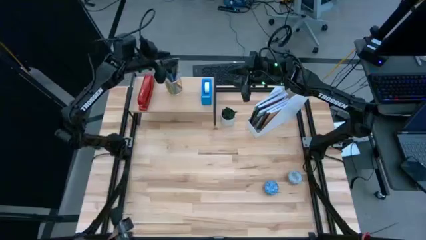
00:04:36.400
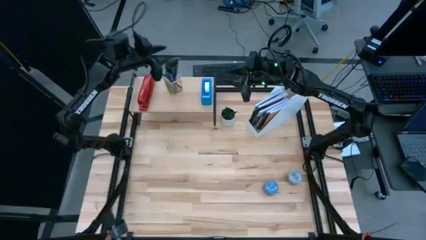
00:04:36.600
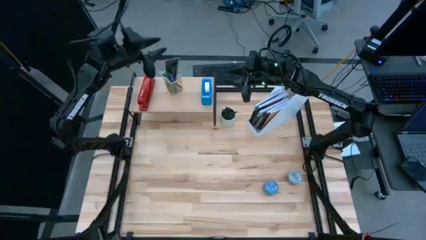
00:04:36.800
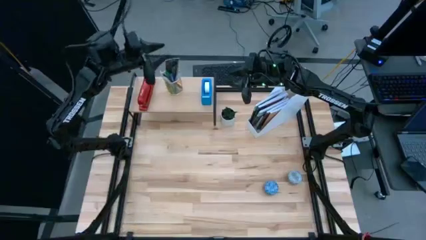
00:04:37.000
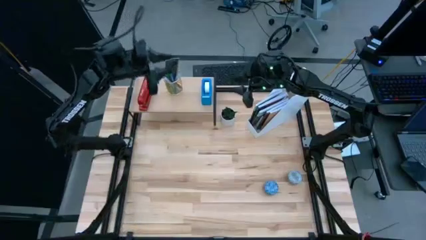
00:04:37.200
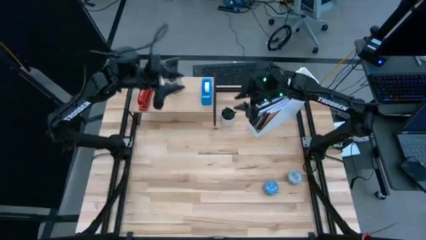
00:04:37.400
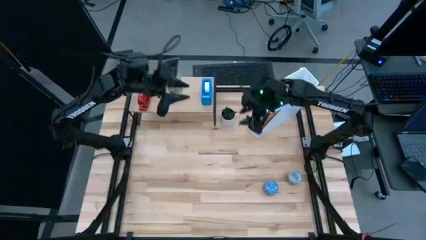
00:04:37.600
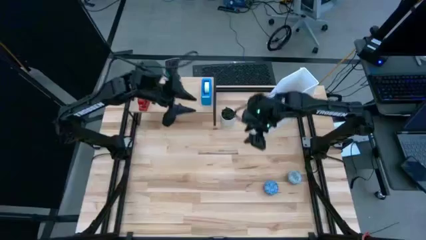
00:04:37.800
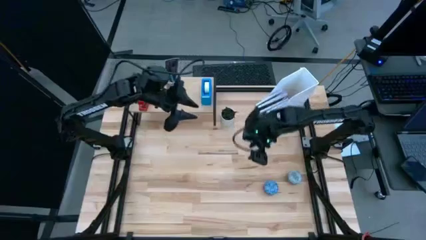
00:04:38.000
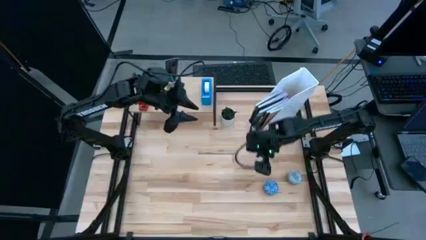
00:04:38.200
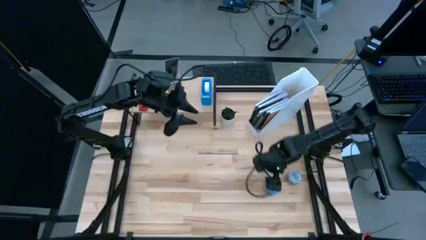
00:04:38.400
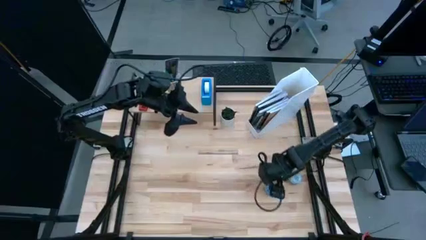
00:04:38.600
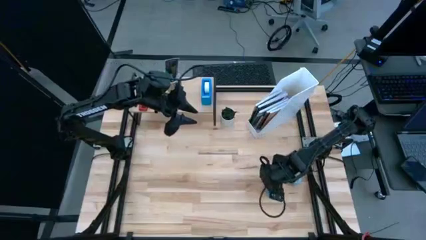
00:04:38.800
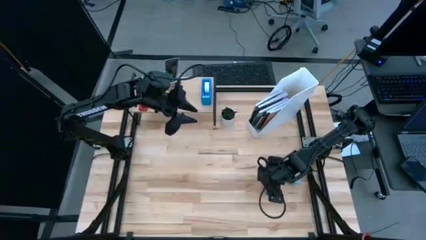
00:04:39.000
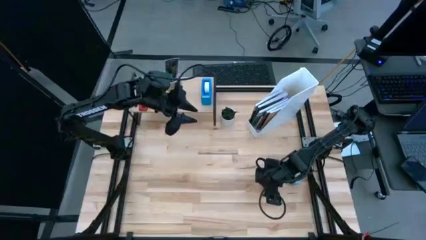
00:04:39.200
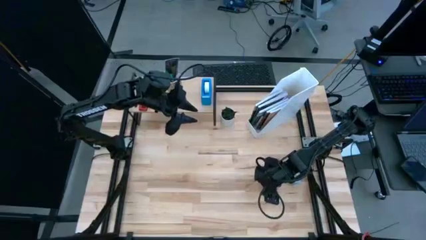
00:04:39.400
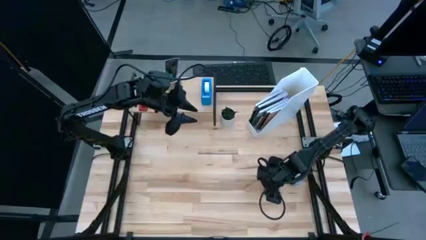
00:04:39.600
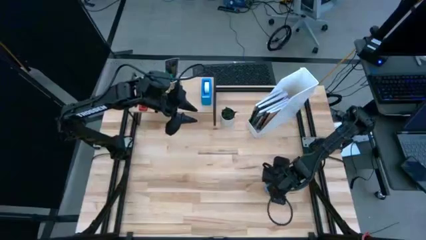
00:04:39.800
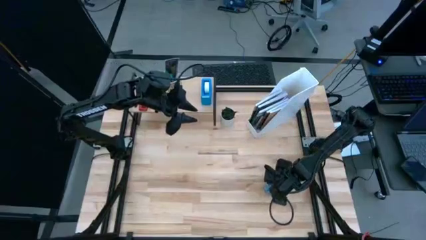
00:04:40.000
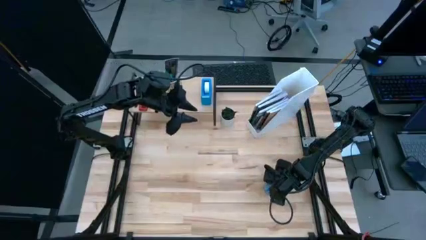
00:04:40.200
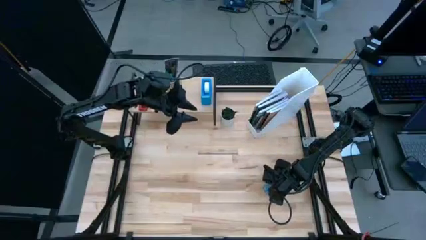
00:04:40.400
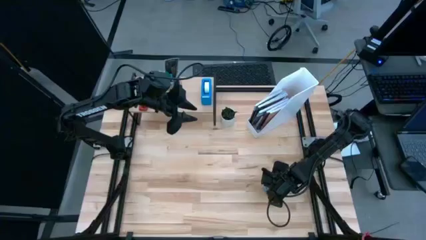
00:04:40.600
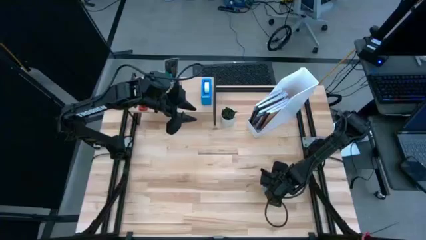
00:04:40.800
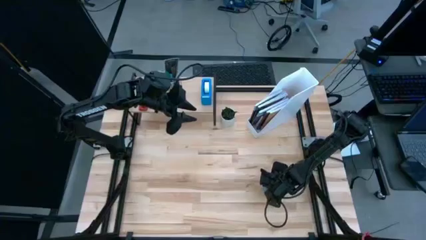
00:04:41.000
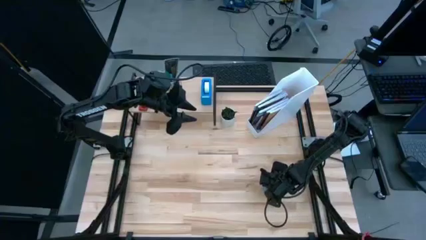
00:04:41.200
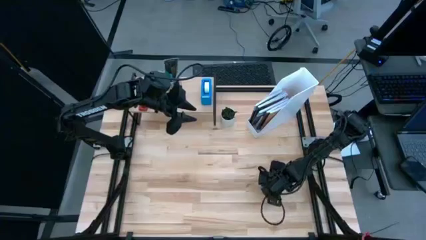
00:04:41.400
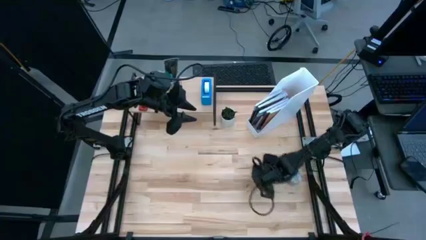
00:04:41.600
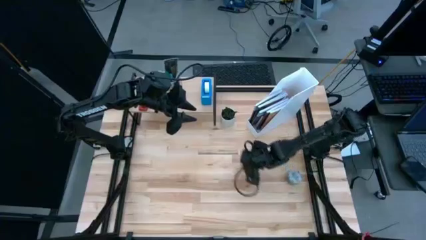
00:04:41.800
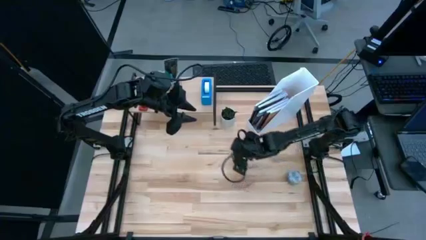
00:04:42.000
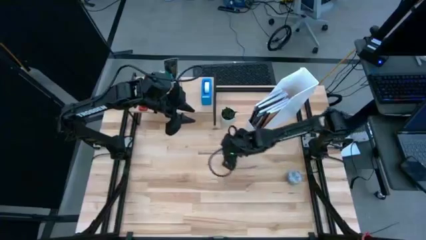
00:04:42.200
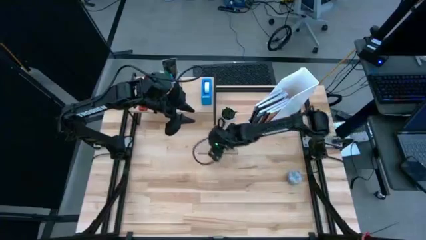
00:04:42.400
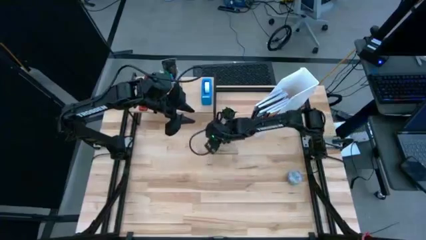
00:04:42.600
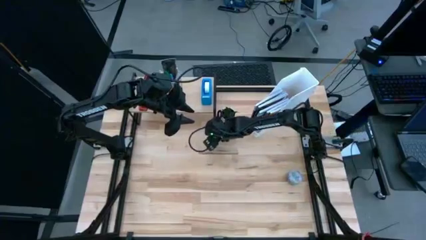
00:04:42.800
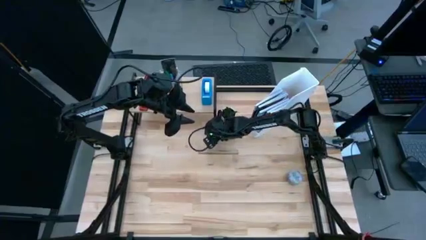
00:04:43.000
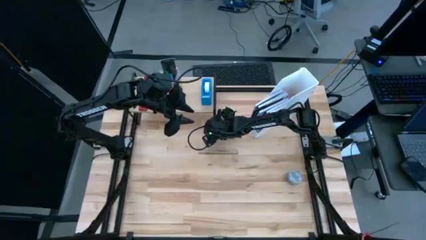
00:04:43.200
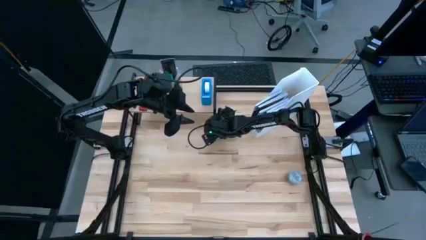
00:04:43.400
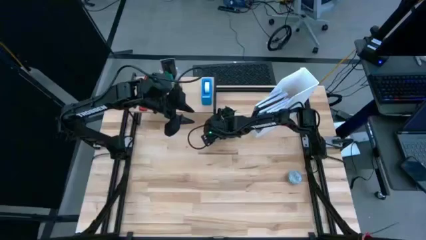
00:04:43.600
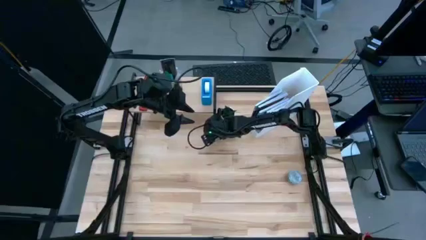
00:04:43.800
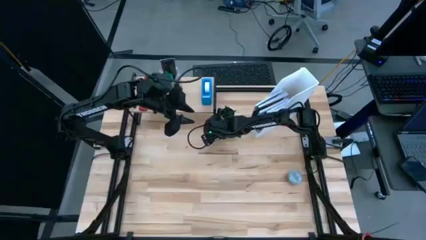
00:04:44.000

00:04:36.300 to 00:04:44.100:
Task: Stock shelves
Put the blue scented candle to the bottom right of the shelf

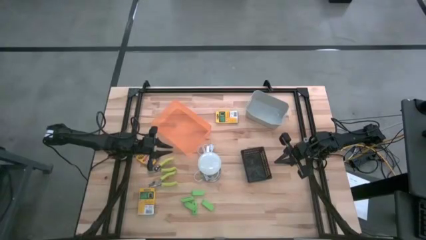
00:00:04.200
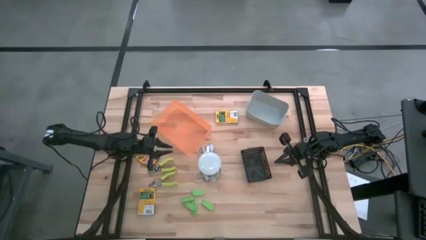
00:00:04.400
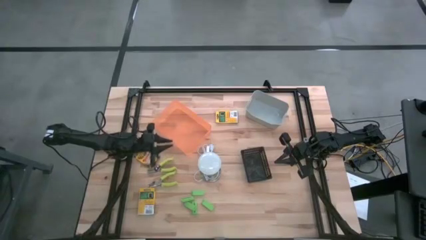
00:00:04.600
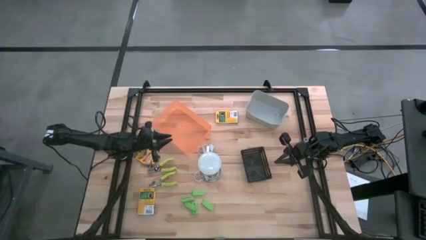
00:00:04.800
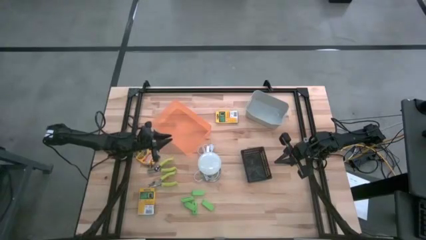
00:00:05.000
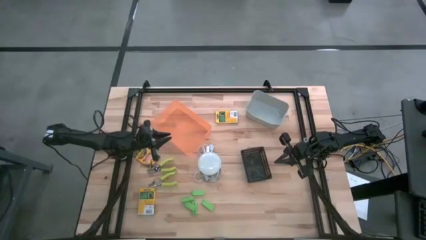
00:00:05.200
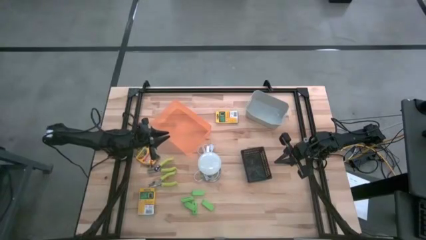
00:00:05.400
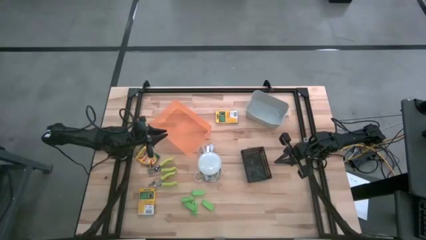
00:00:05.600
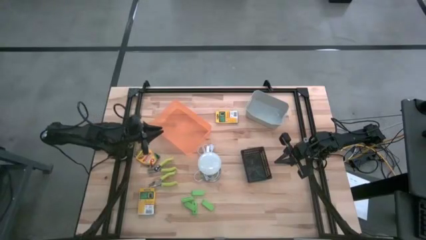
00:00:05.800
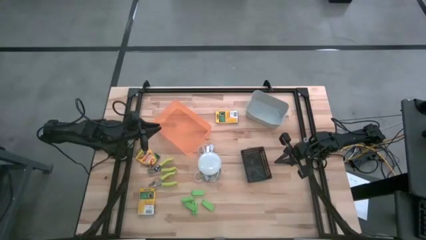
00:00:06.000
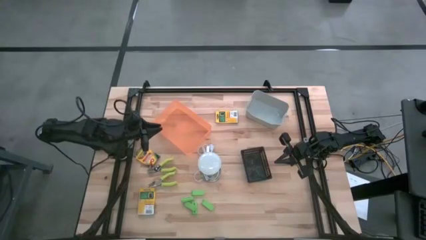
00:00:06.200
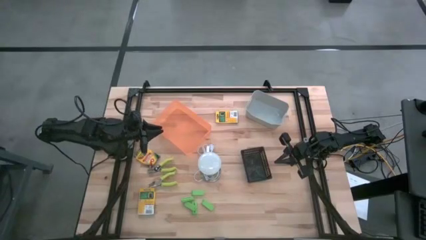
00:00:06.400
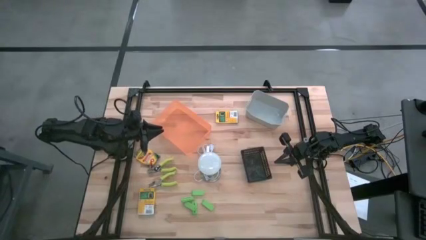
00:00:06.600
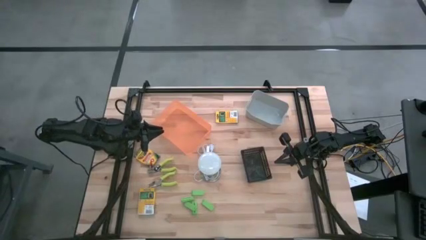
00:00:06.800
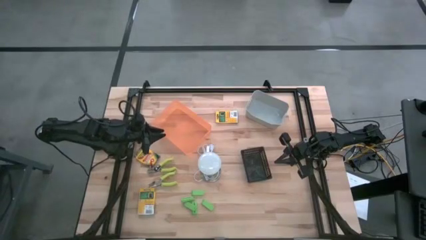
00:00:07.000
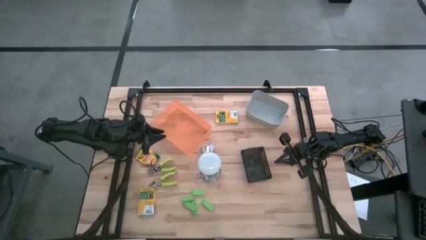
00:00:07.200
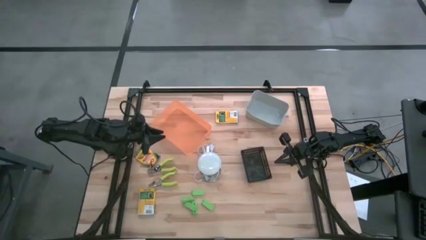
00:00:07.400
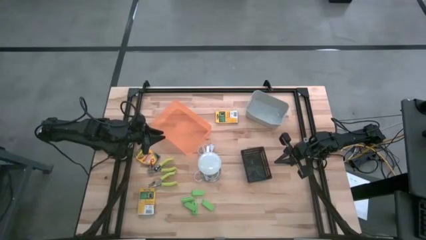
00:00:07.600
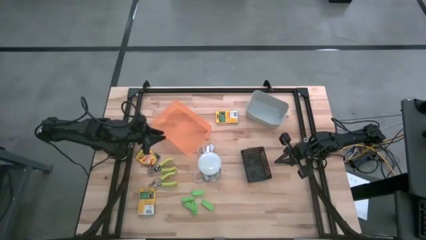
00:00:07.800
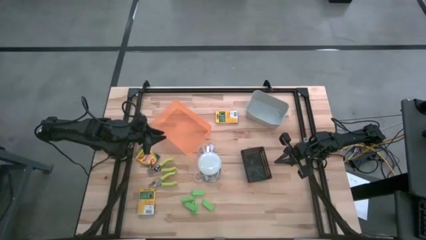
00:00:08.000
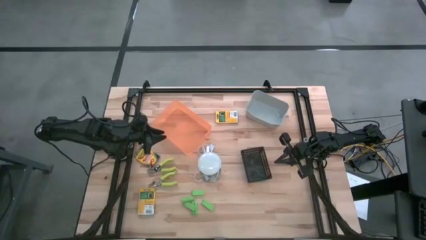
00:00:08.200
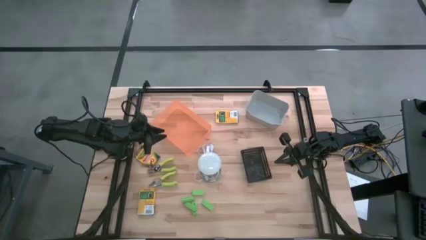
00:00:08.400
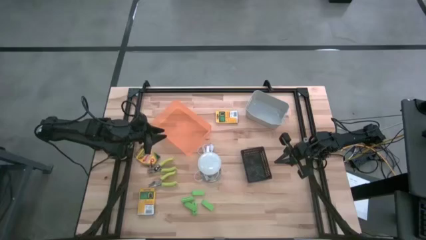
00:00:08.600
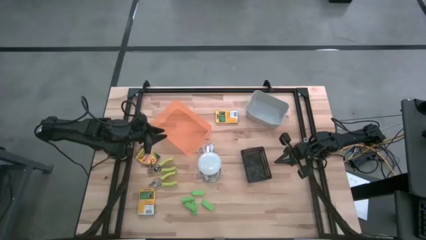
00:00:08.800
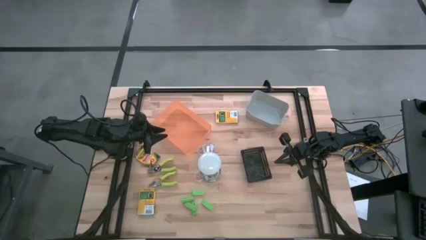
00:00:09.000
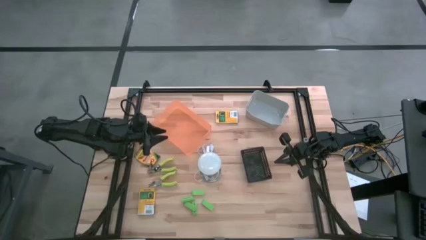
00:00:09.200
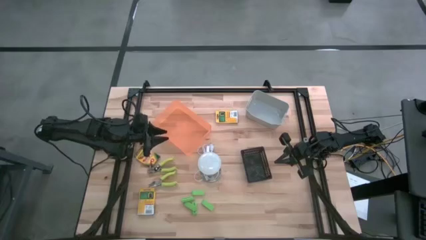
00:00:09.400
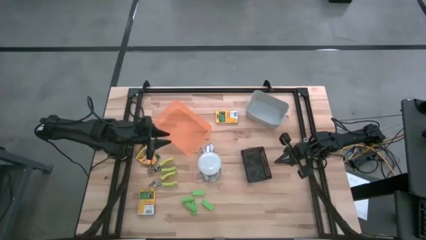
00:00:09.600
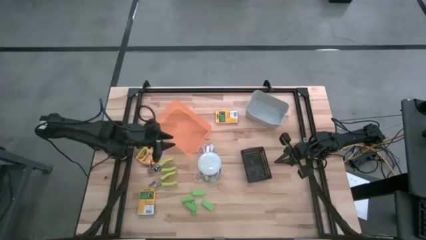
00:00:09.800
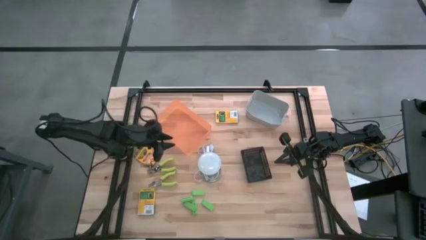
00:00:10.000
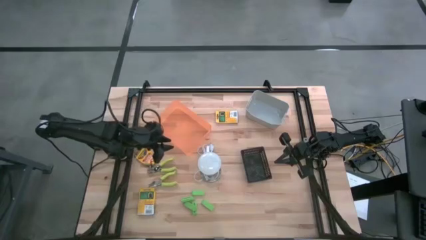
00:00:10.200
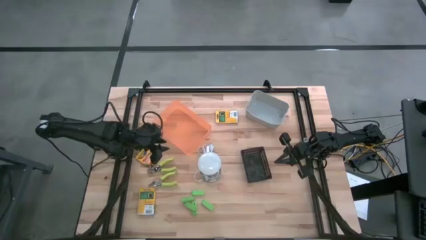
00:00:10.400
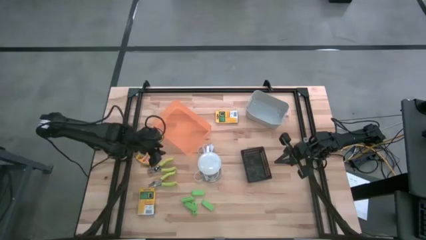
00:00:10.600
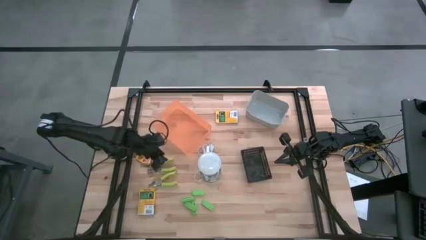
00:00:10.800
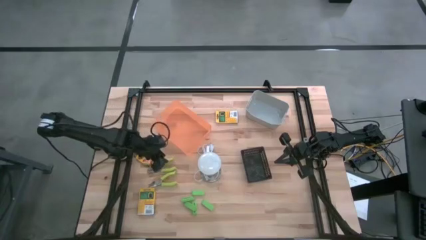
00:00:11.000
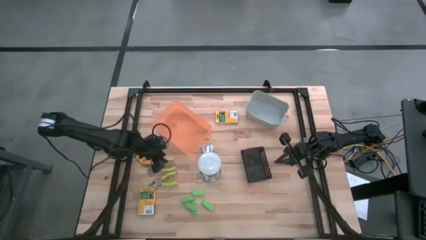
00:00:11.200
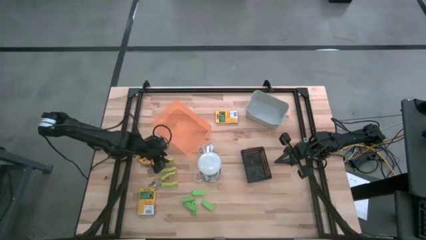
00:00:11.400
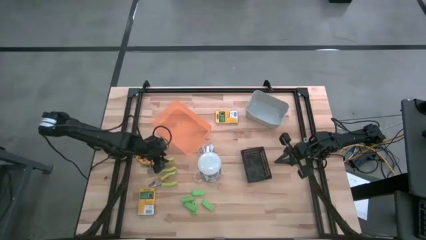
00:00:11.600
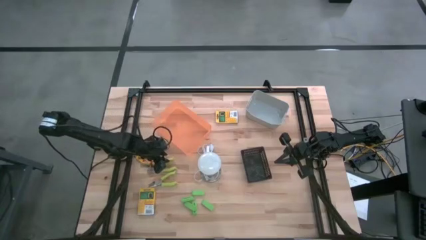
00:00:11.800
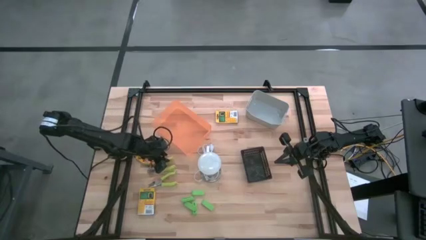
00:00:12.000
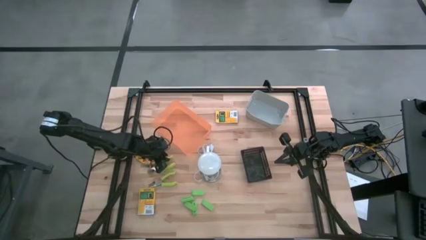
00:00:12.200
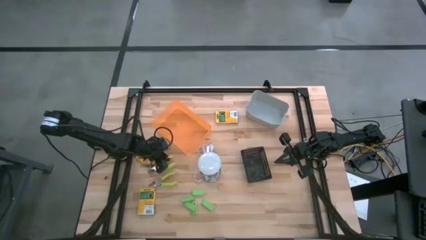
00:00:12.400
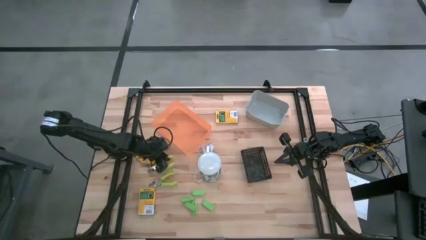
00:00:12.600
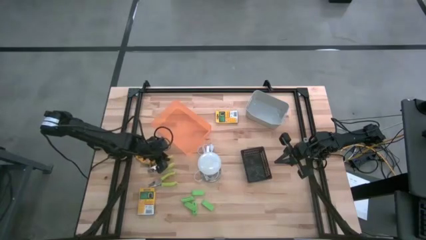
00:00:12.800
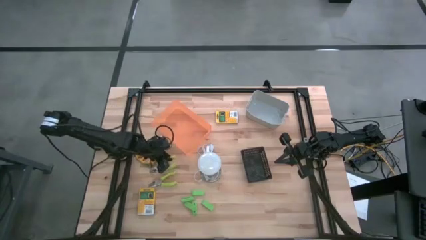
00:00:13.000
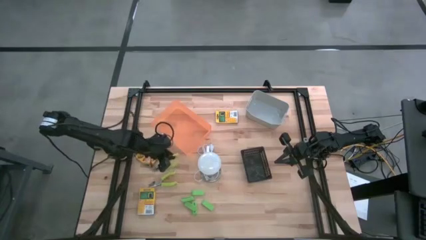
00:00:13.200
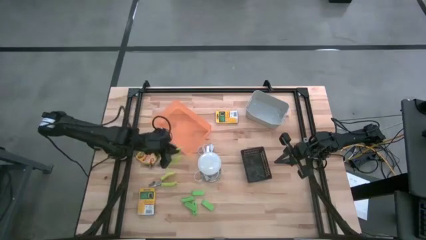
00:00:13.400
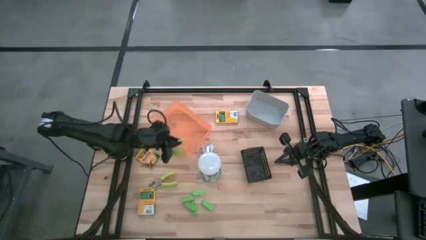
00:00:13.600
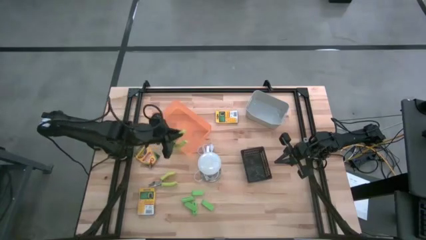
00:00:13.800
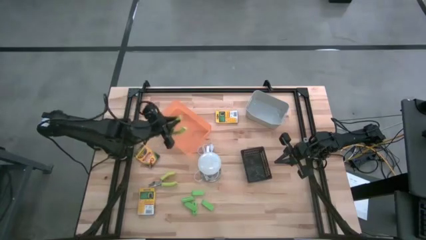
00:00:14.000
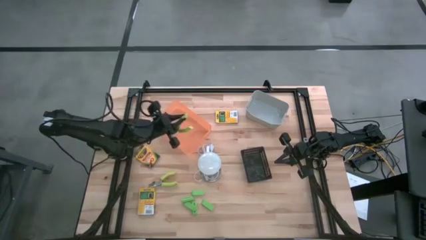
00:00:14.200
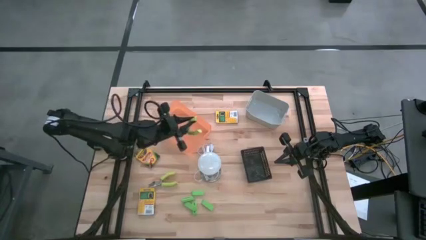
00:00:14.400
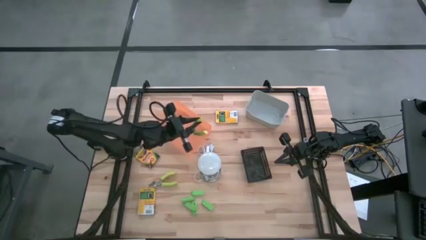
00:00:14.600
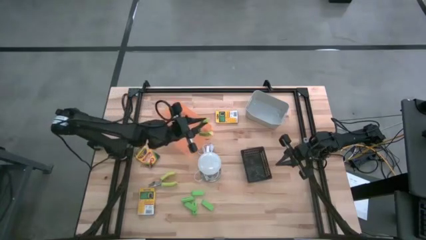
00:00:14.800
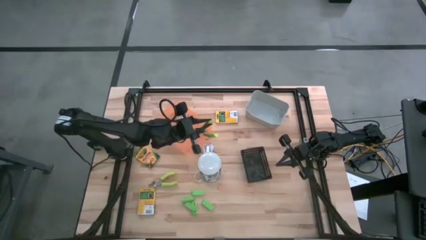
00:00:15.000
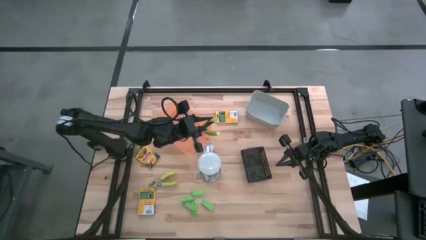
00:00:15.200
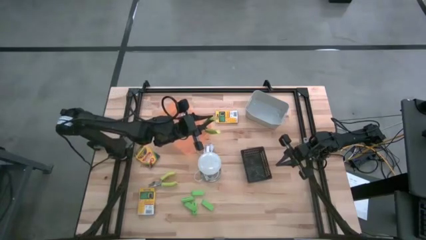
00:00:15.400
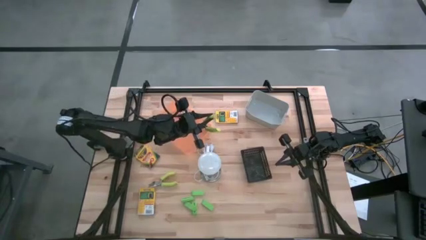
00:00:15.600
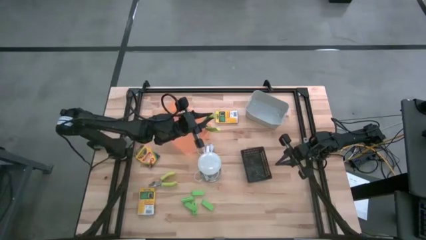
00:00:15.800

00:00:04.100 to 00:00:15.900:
Task: Pick & Place School Supplies
Put the green punch plier into the gray bin
